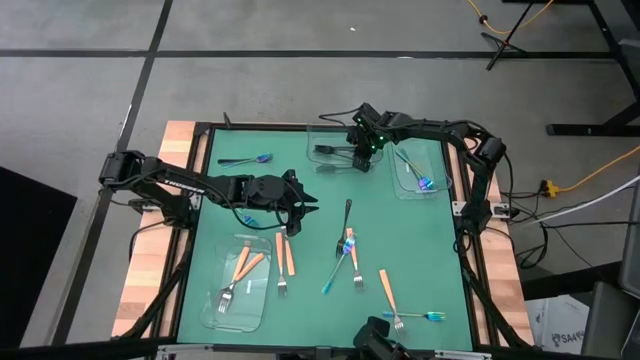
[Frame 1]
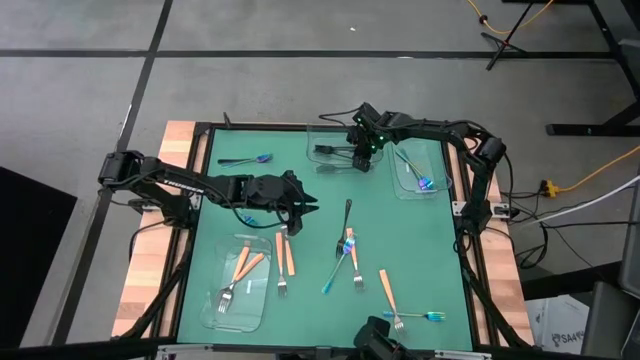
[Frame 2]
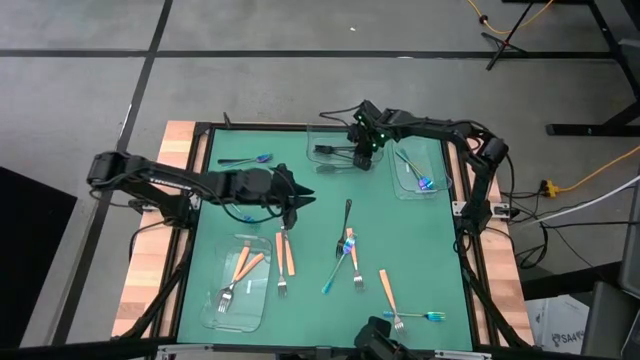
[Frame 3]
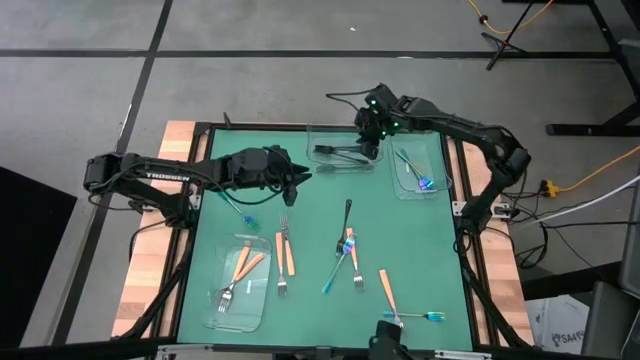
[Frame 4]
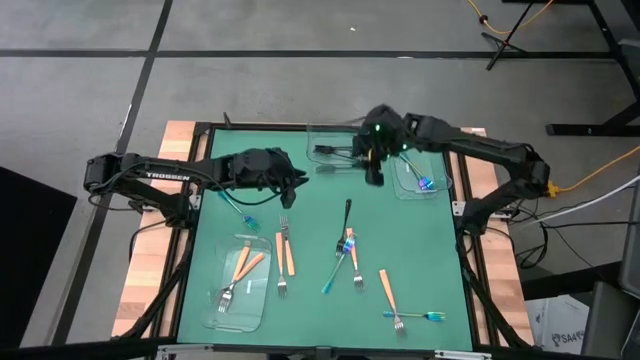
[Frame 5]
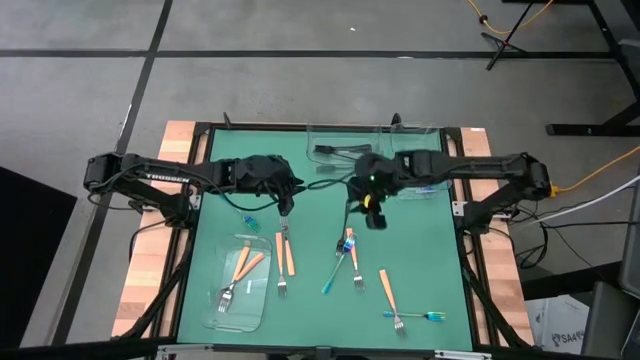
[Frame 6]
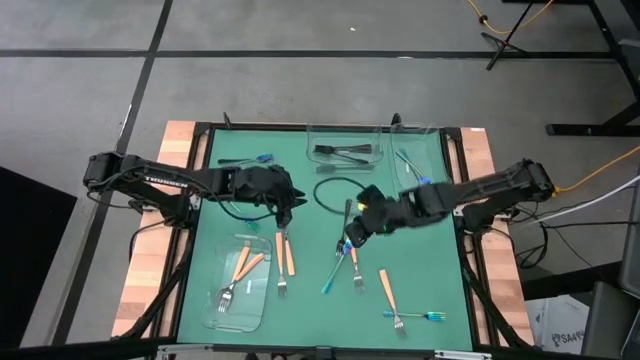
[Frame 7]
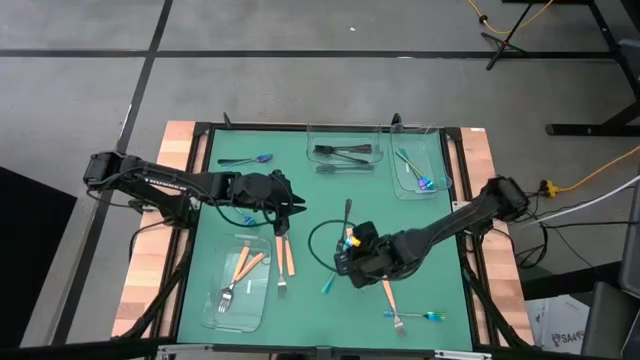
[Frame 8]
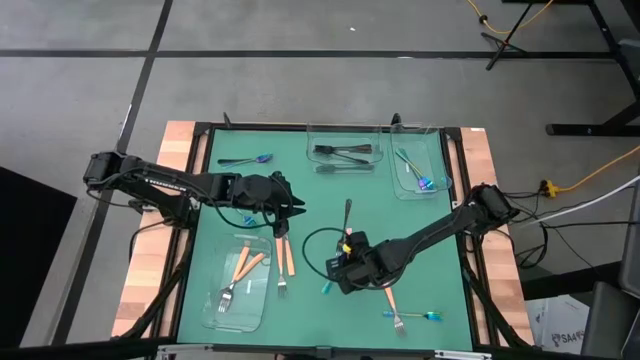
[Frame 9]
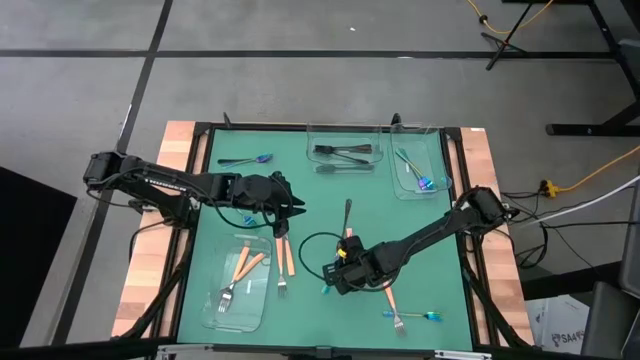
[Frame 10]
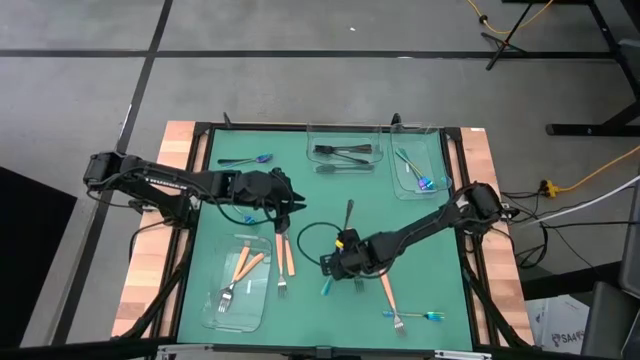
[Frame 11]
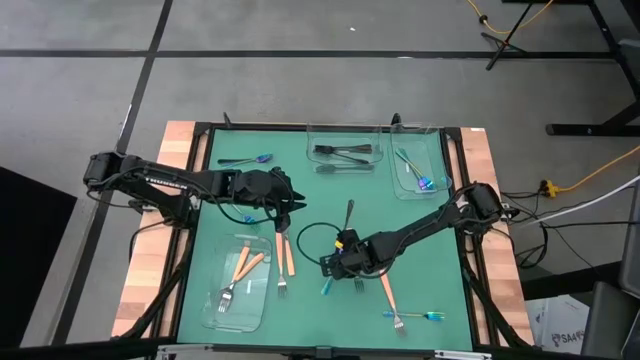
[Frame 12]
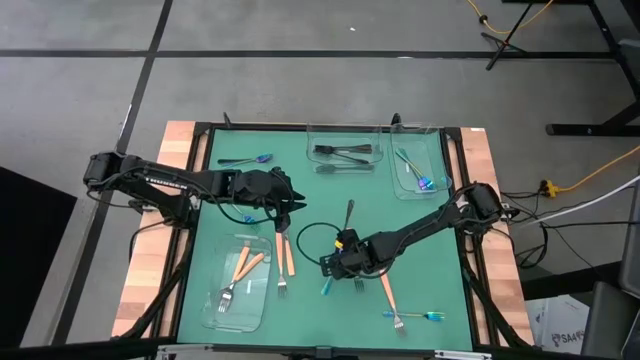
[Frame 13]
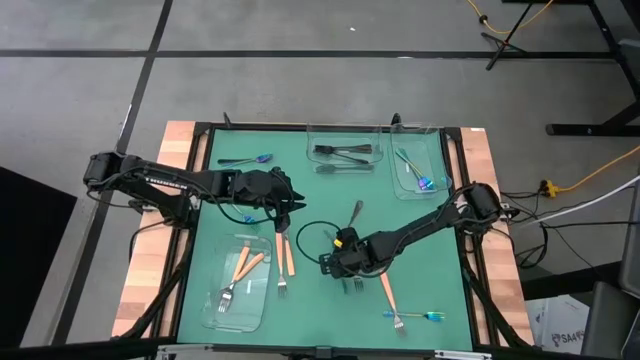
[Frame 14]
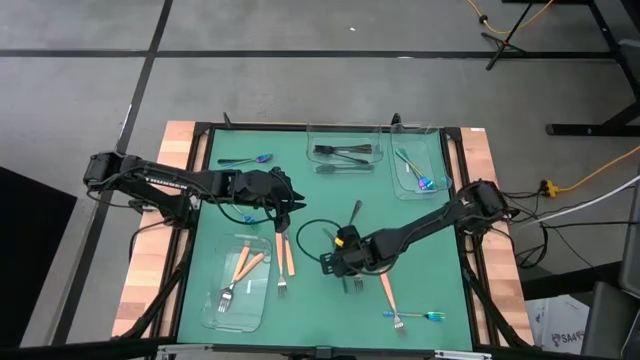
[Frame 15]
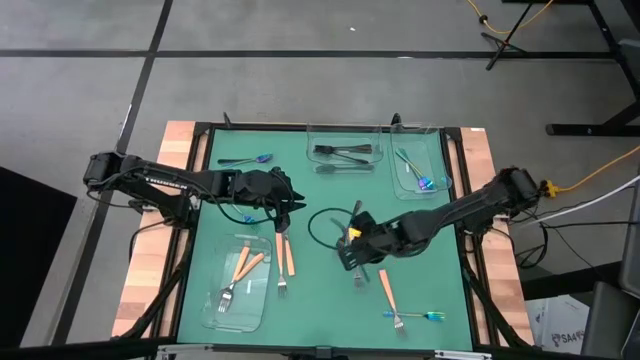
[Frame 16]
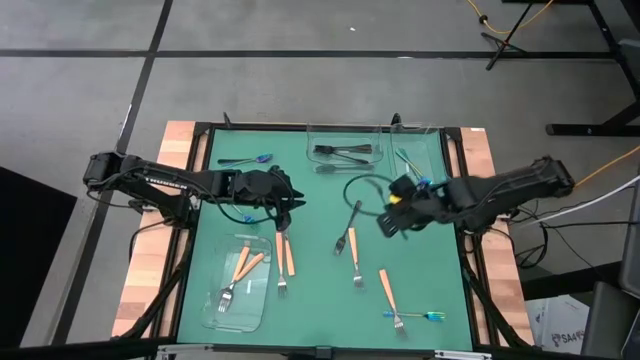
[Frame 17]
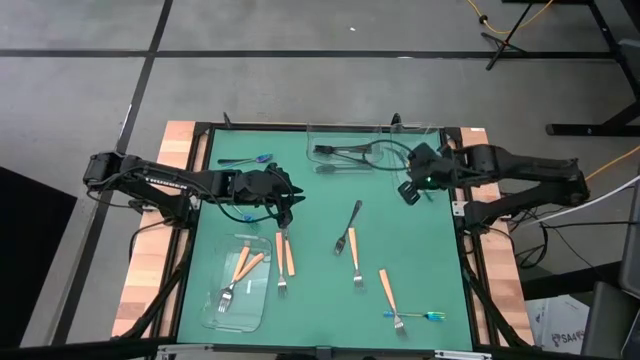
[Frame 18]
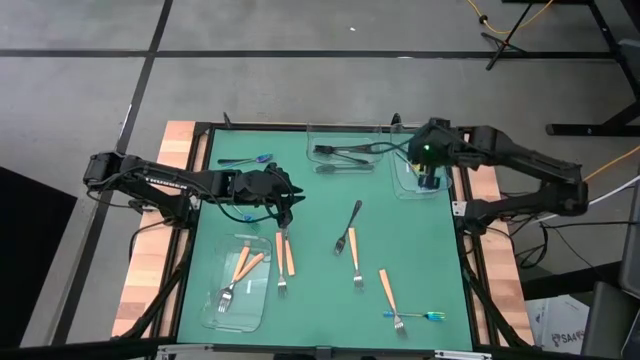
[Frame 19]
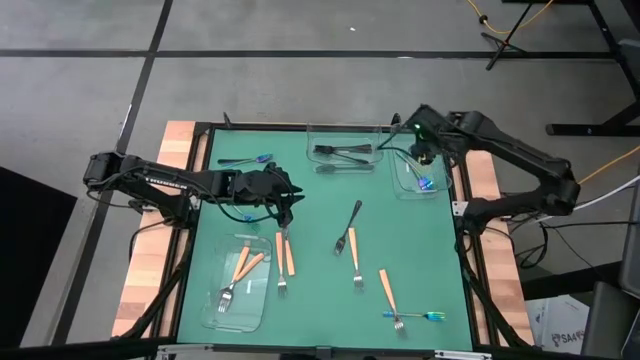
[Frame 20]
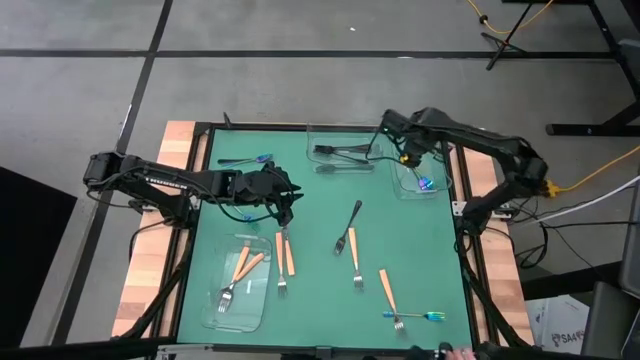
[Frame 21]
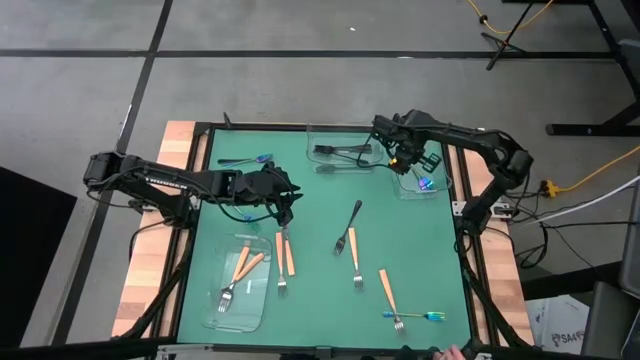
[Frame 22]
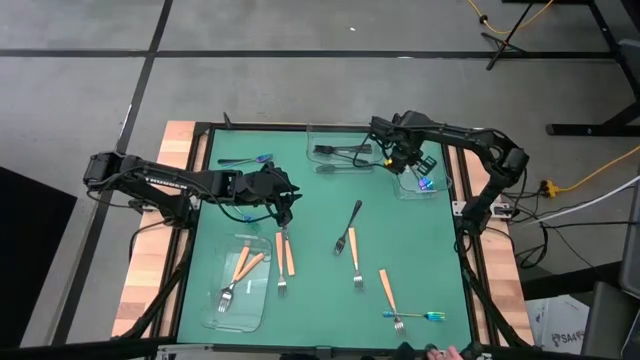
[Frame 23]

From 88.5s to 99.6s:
Task: Sort silverware by color (type)
Put the blue fork into the top right transparent bin

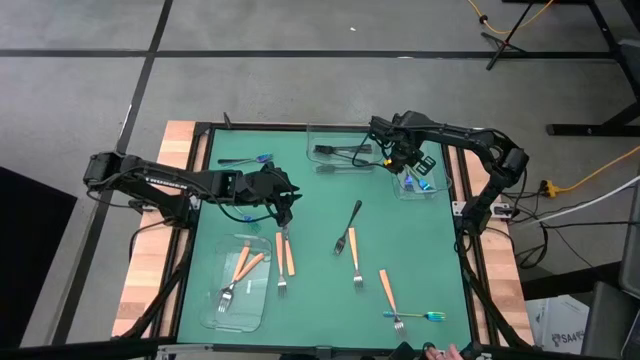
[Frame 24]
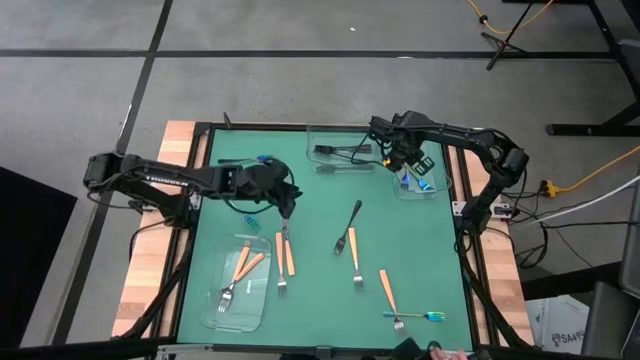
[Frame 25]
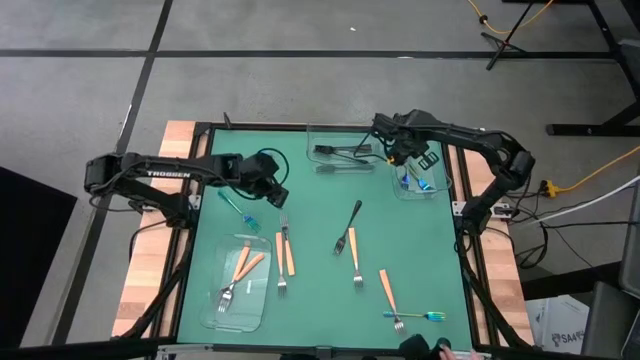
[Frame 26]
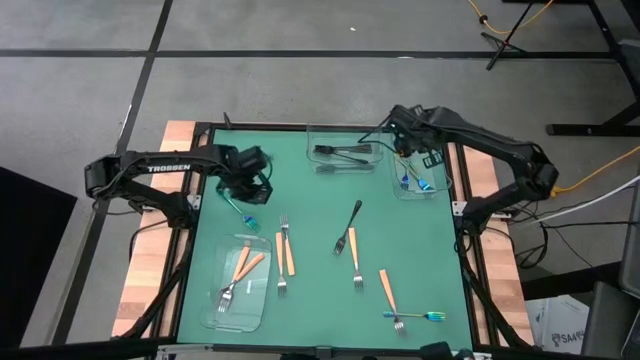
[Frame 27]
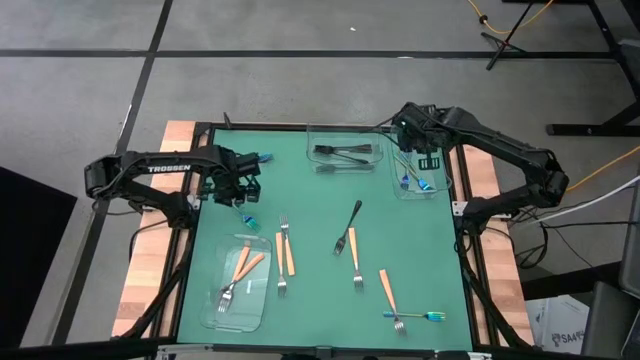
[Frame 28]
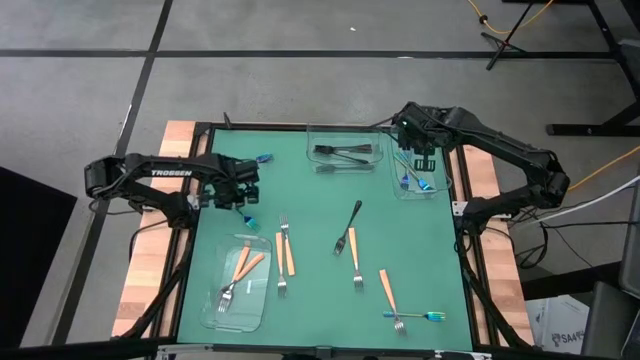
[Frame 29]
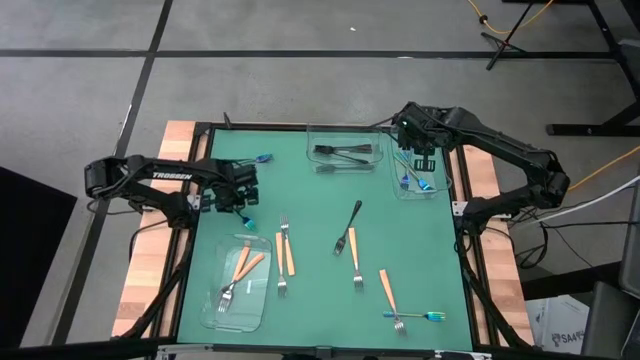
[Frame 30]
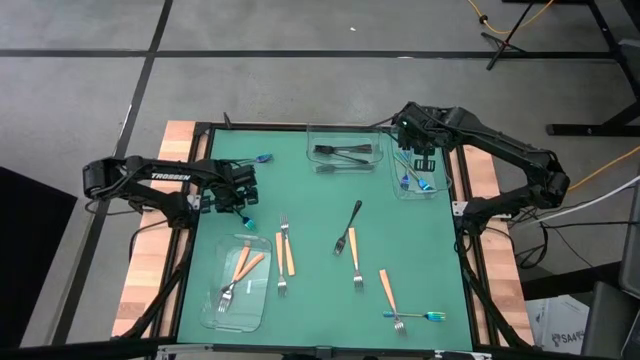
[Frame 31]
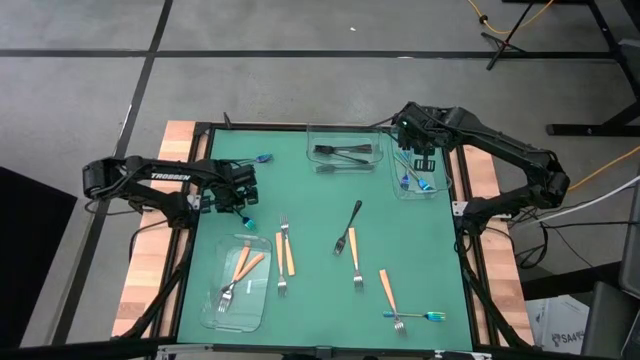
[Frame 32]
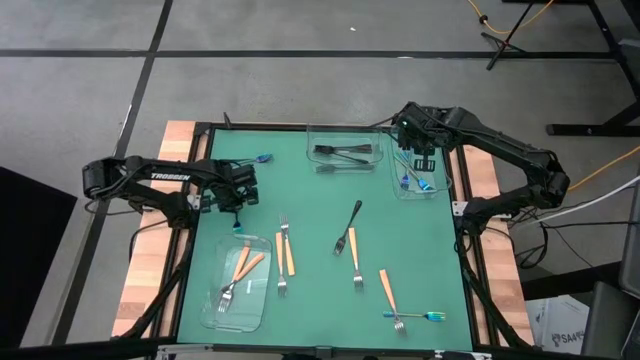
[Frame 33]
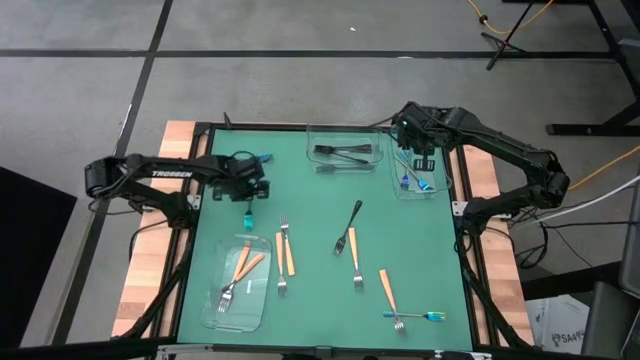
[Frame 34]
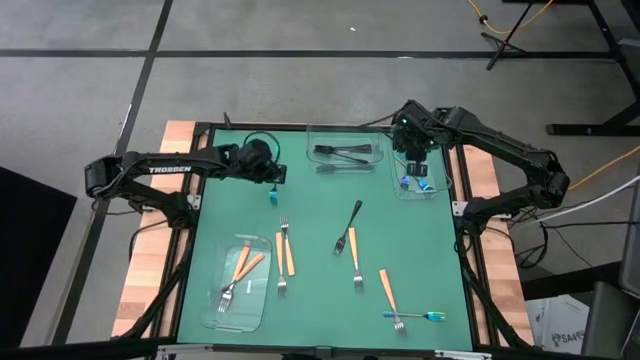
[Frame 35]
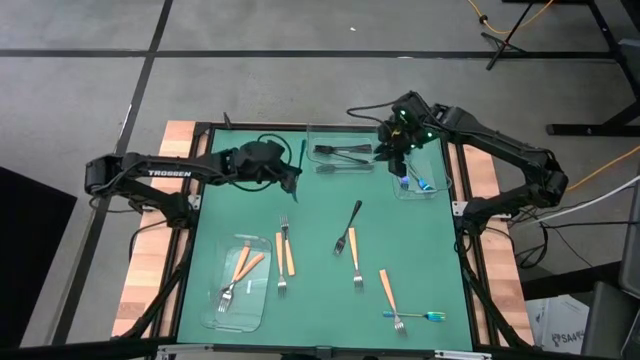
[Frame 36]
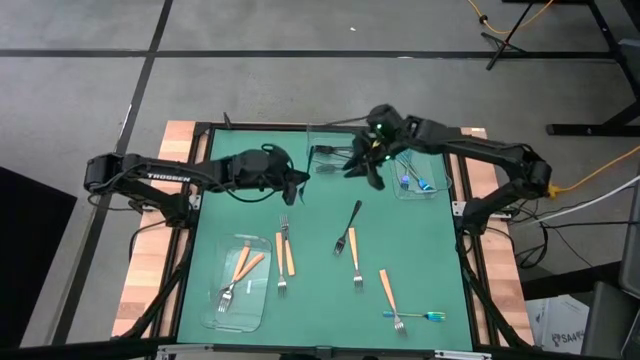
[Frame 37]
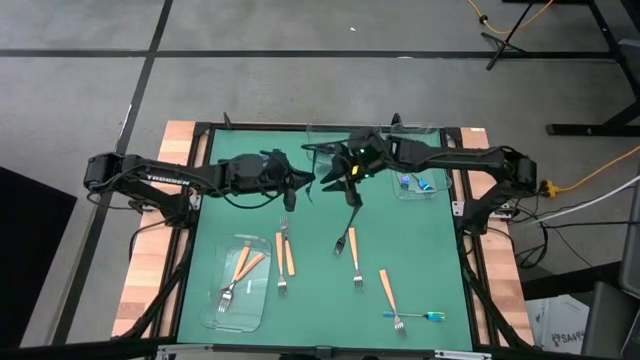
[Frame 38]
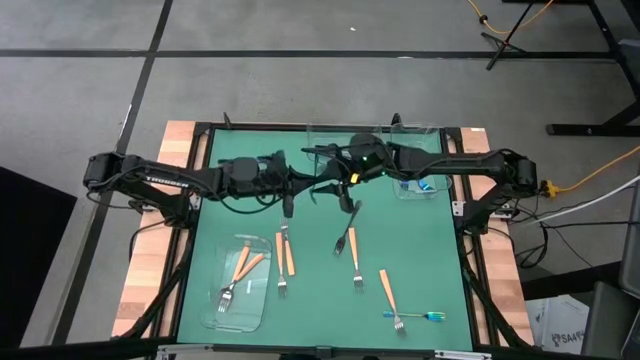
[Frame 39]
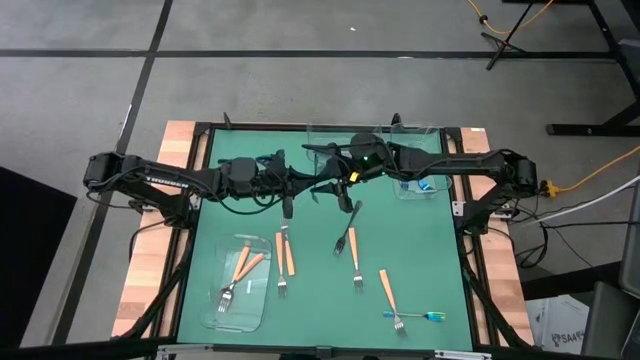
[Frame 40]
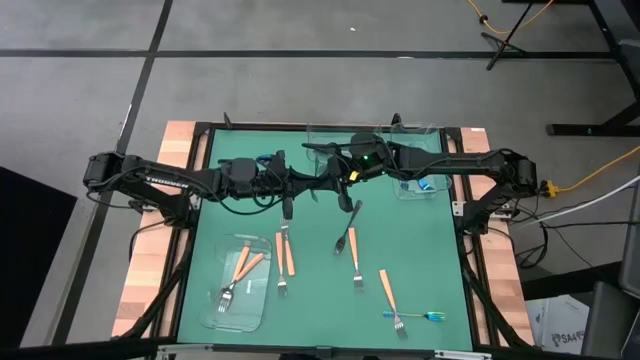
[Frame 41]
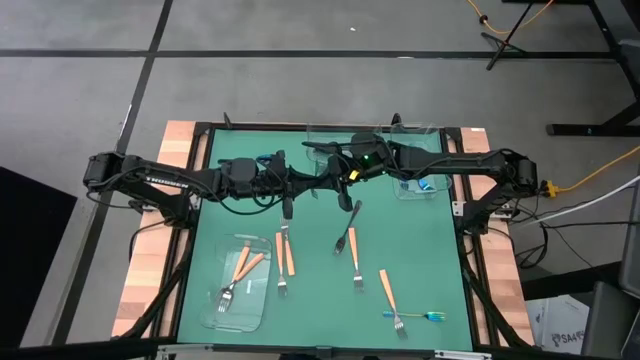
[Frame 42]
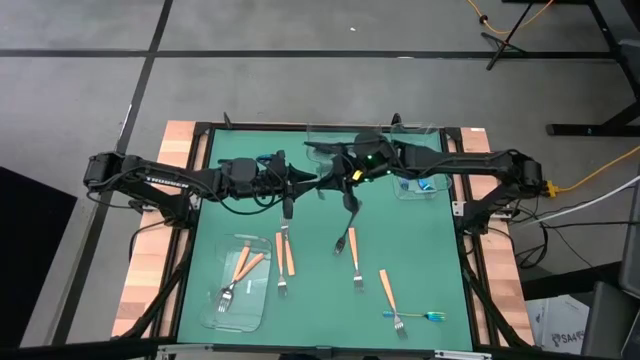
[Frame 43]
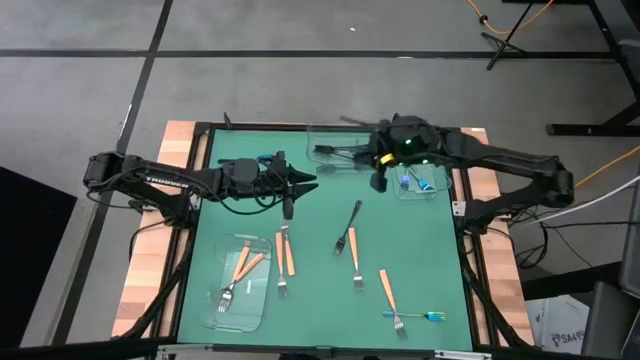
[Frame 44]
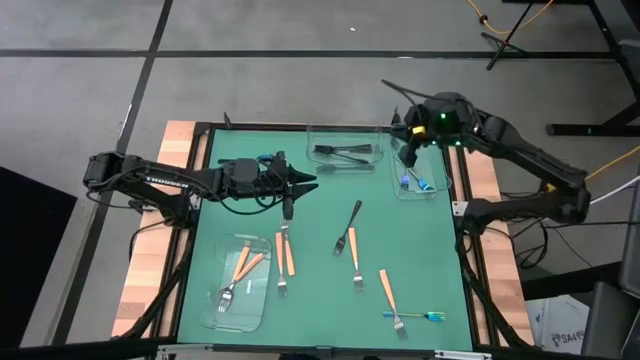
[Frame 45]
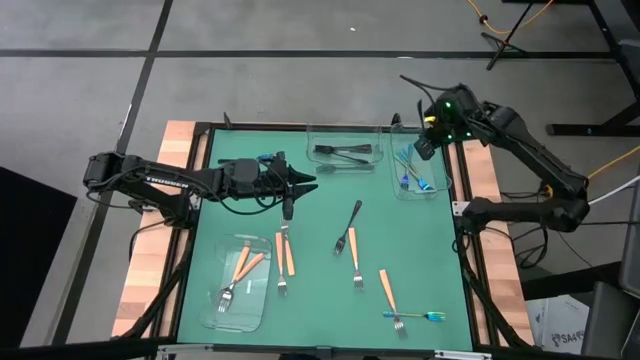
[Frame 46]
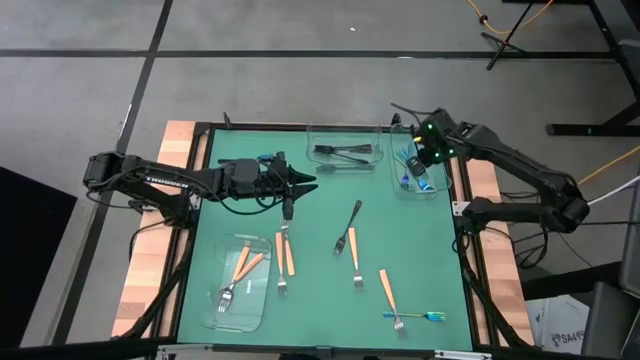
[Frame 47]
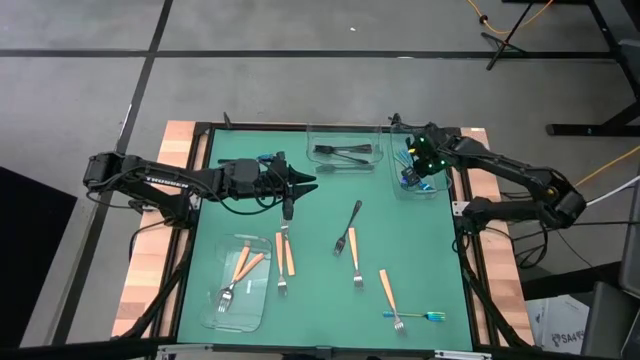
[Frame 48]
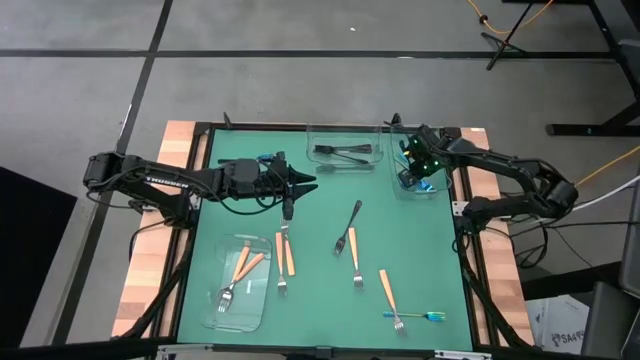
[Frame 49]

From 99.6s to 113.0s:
Put the blue fork into the top right transparent bin
